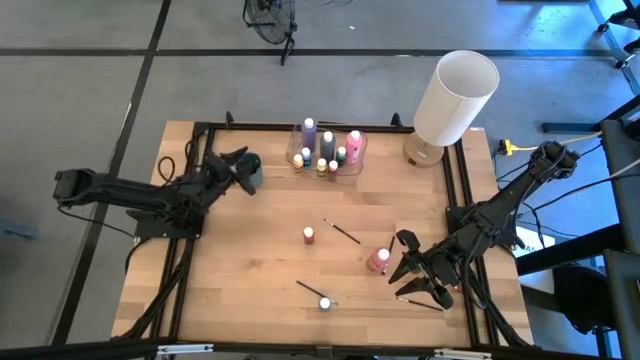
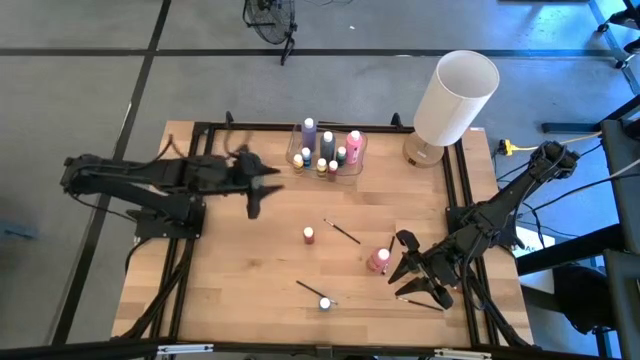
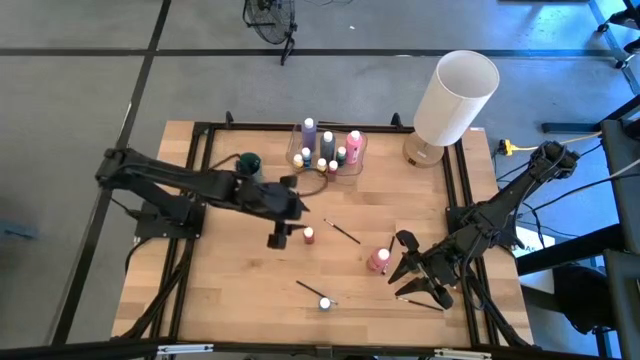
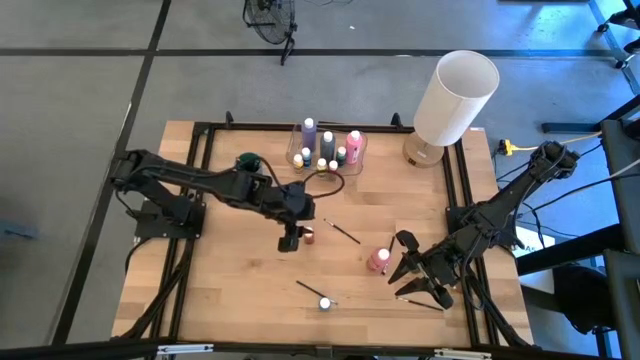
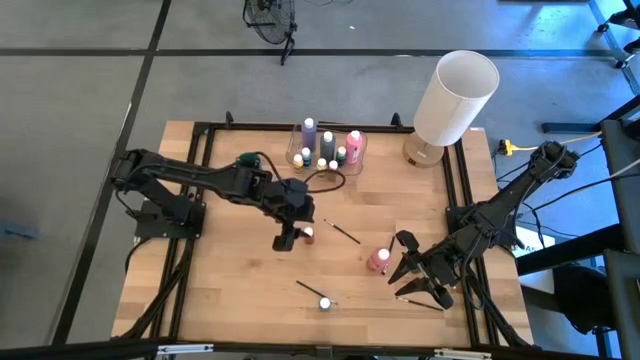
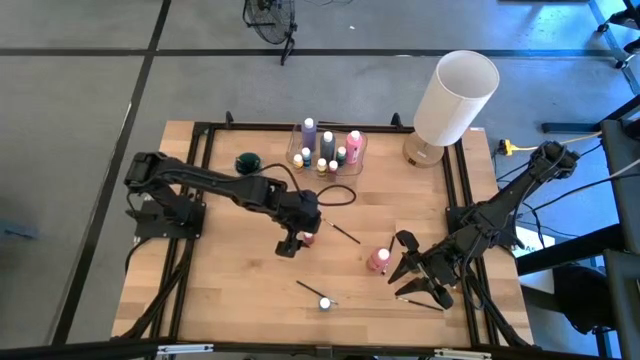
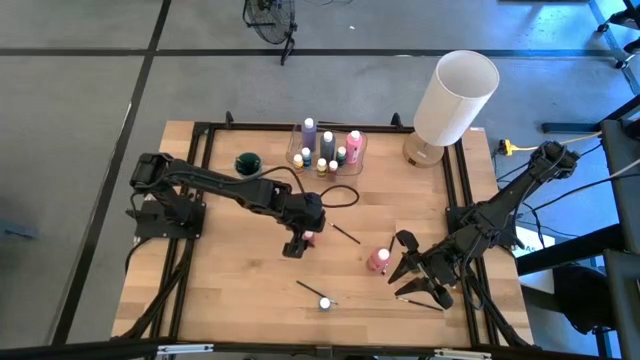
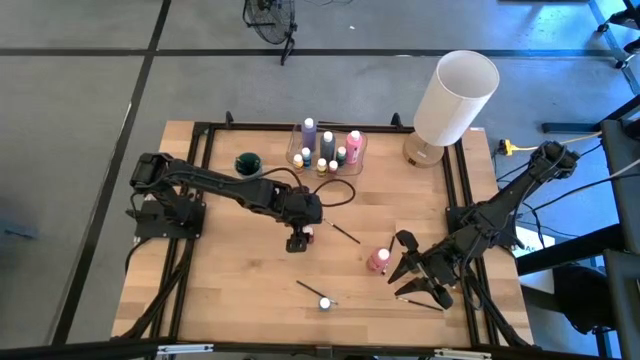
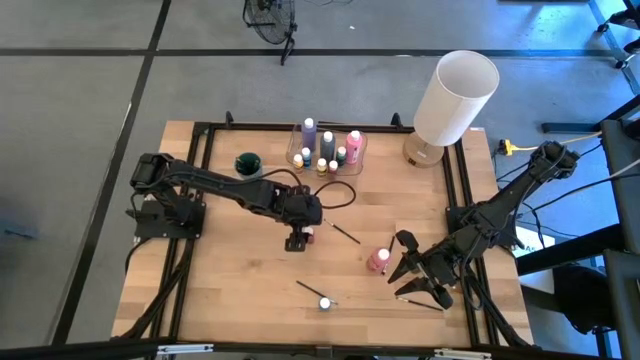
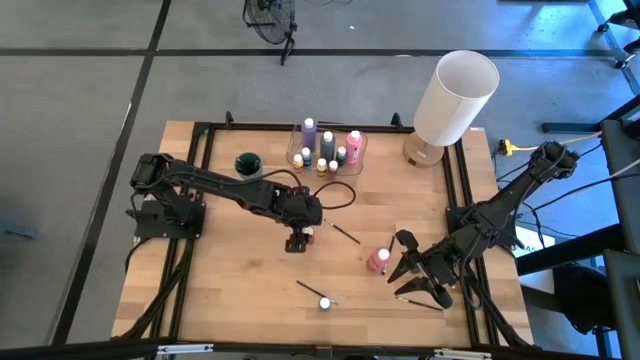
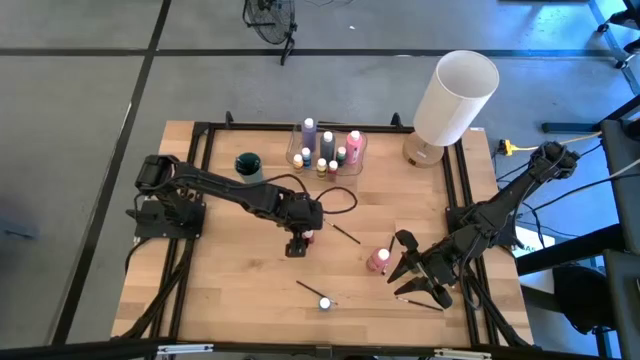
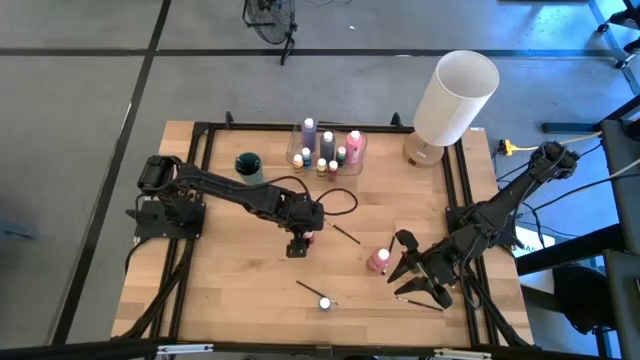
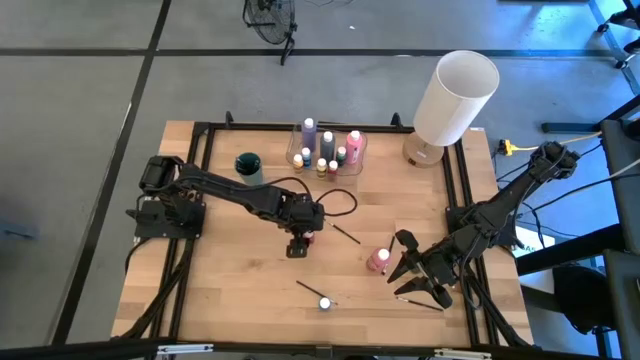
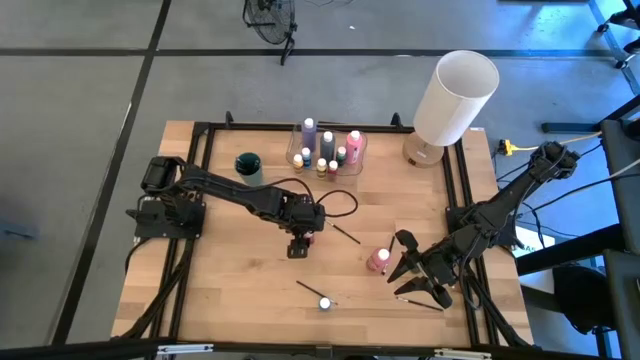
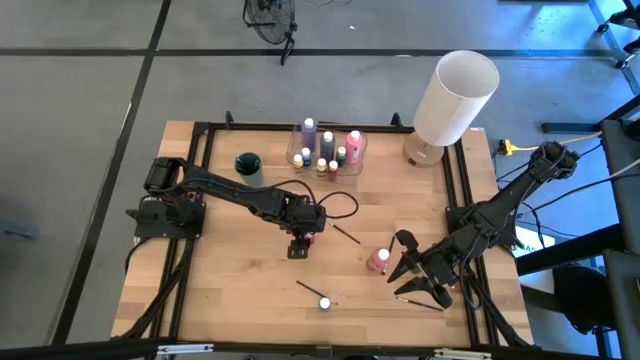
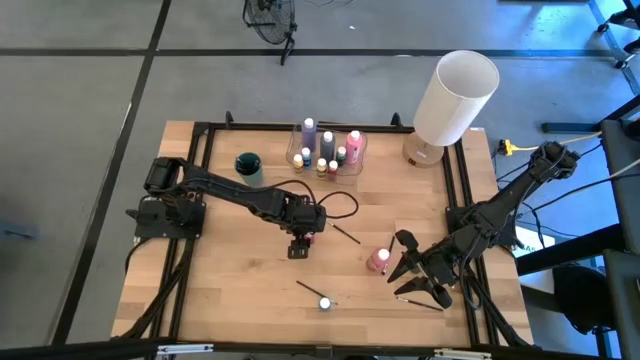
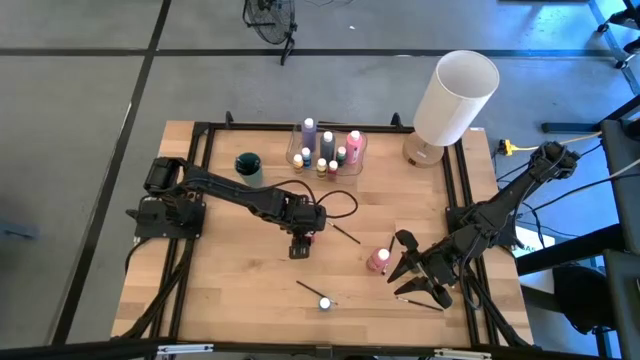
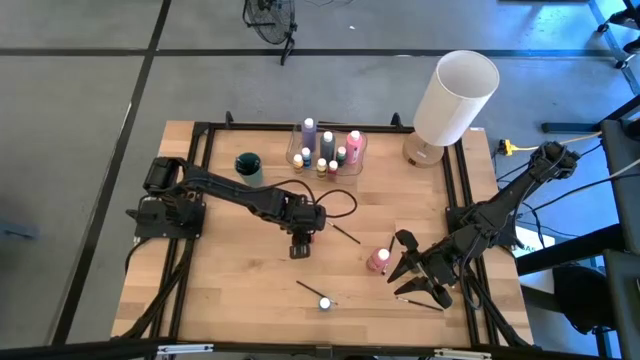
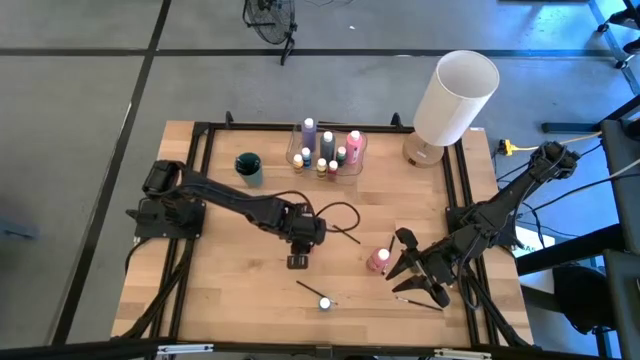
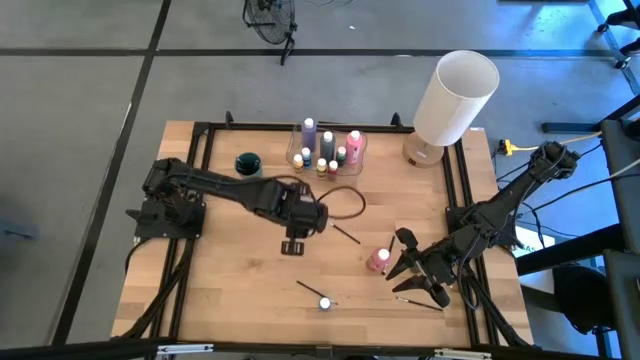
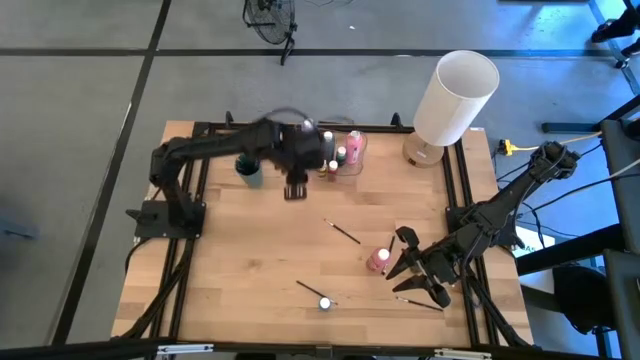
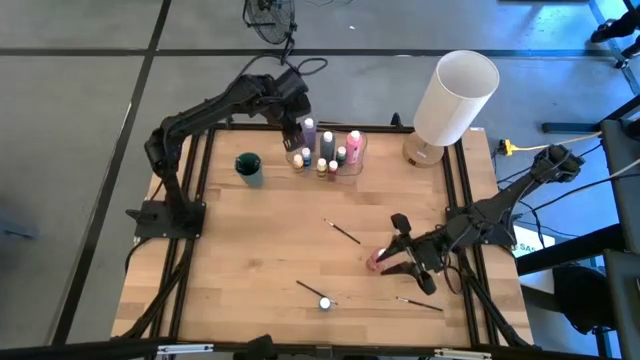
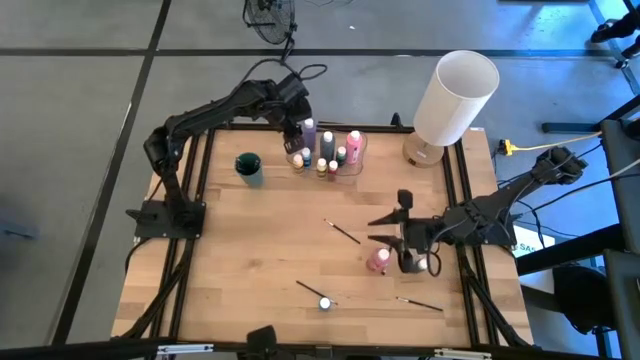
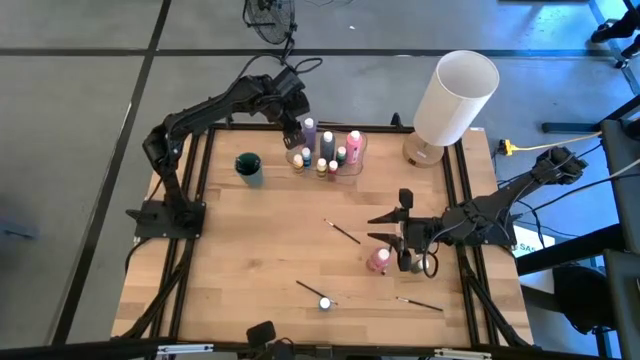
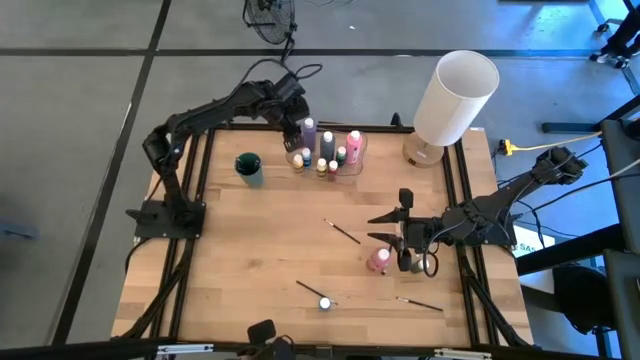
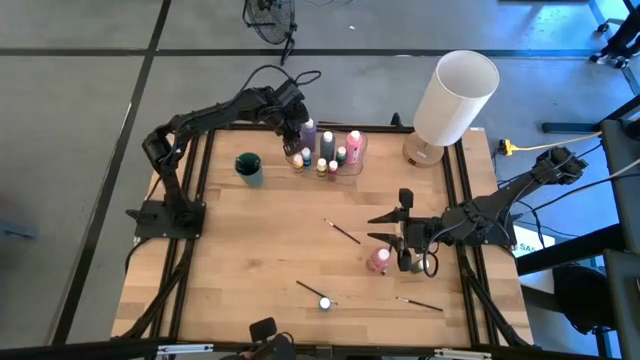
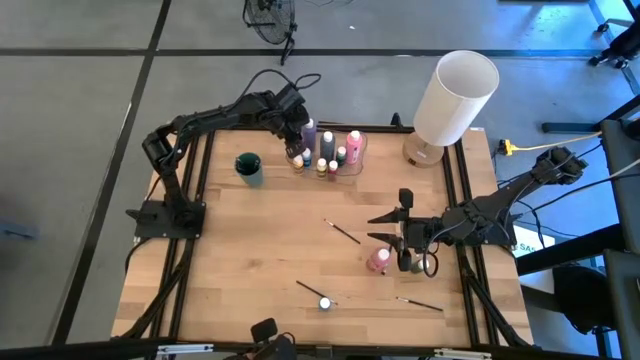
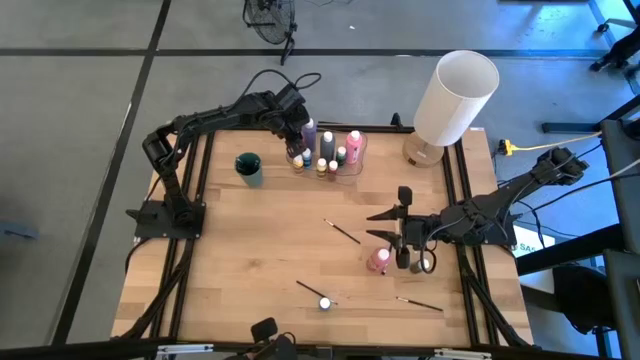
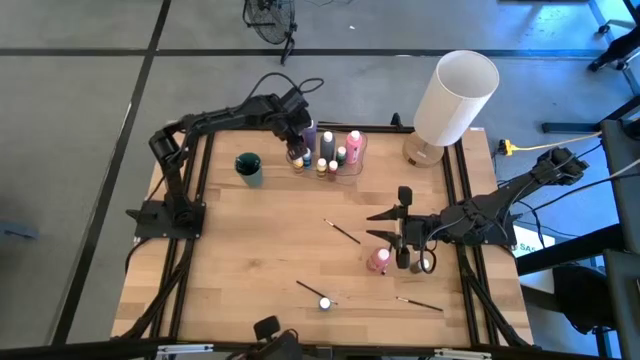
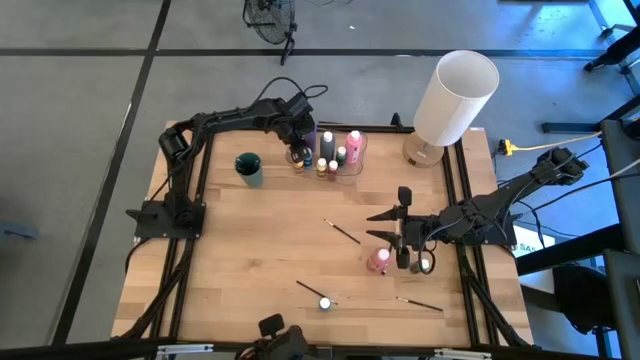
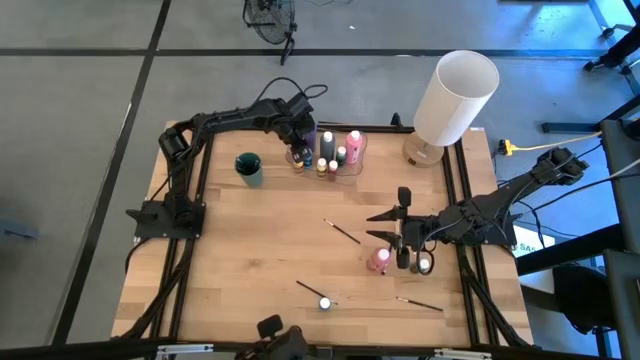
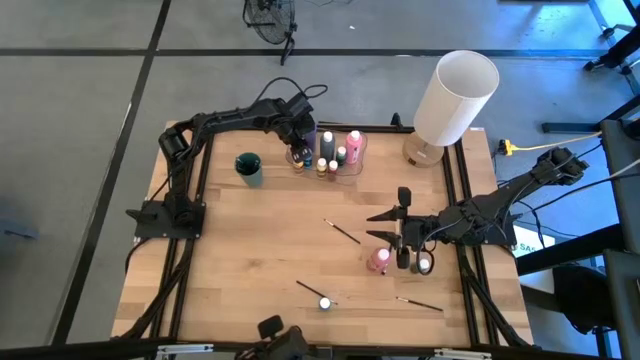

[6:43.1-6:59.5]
Task: Pick & Place Paint Supplies
Put the red paint bottle into the transparent bin

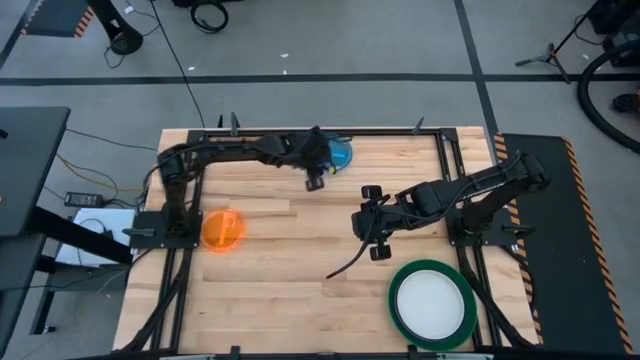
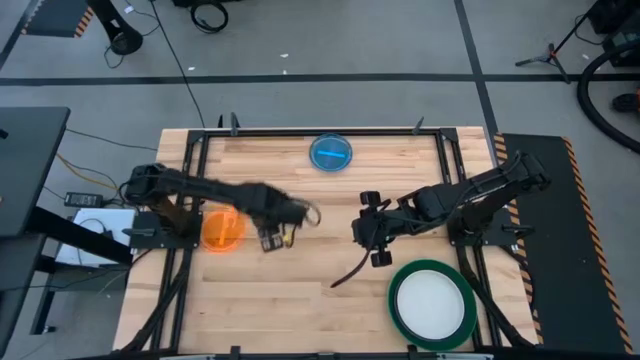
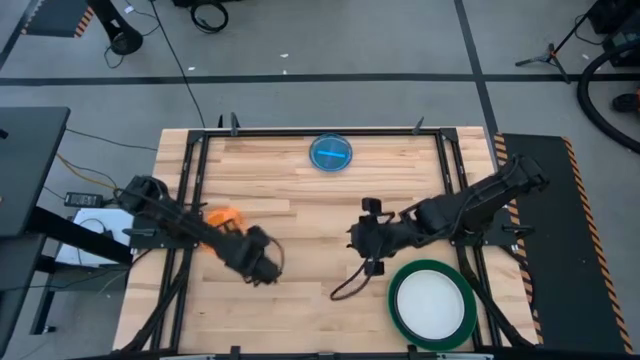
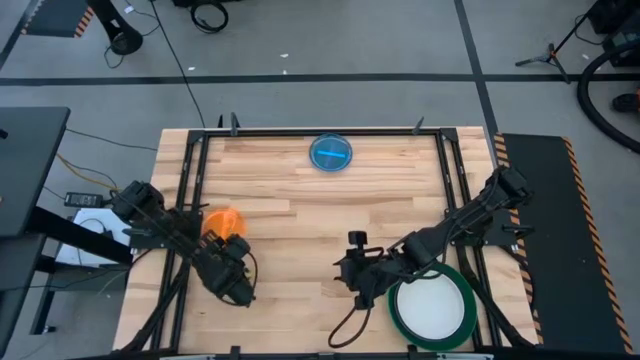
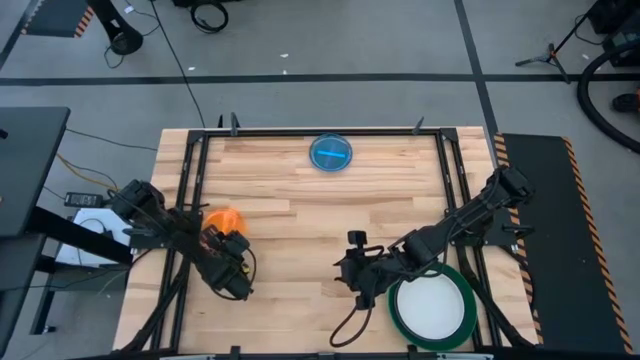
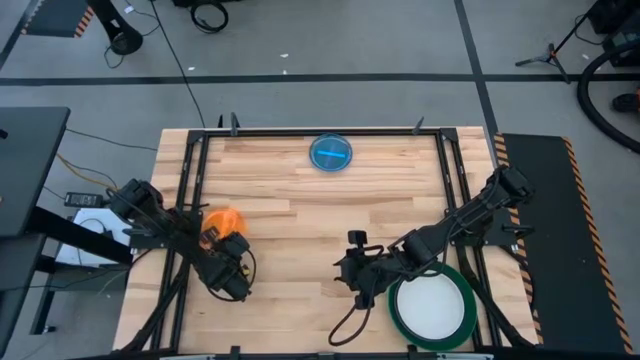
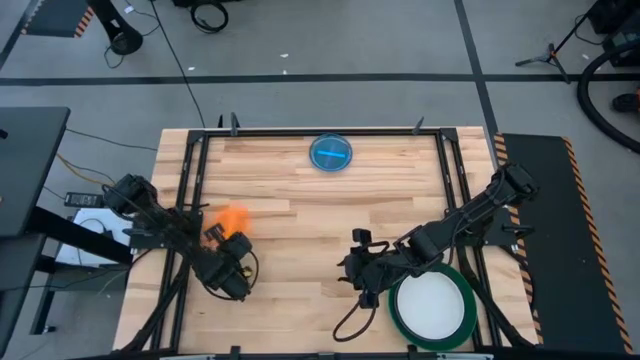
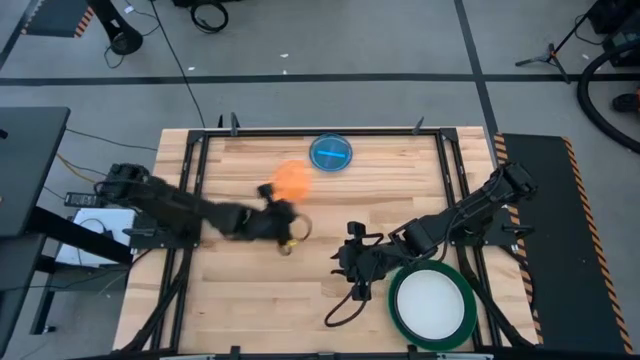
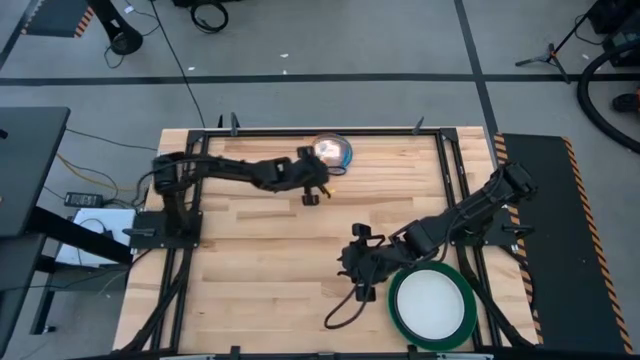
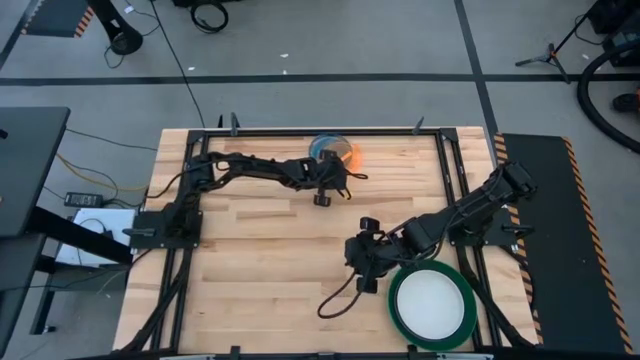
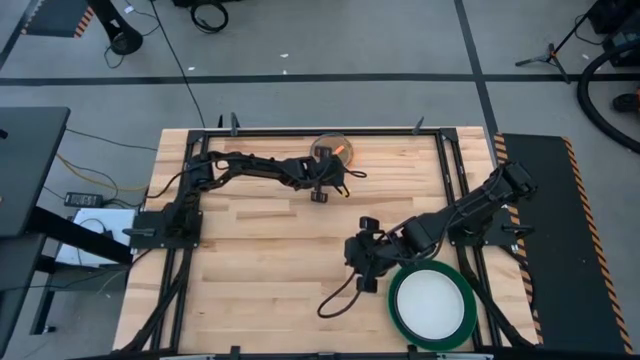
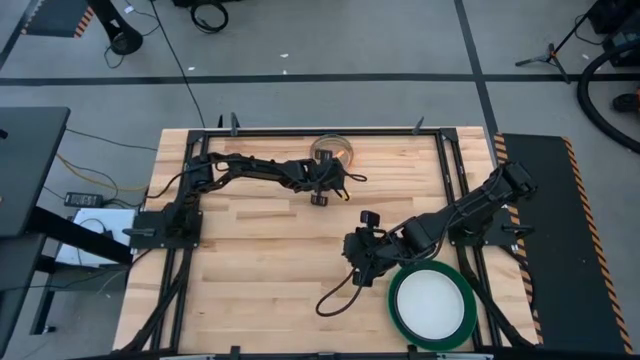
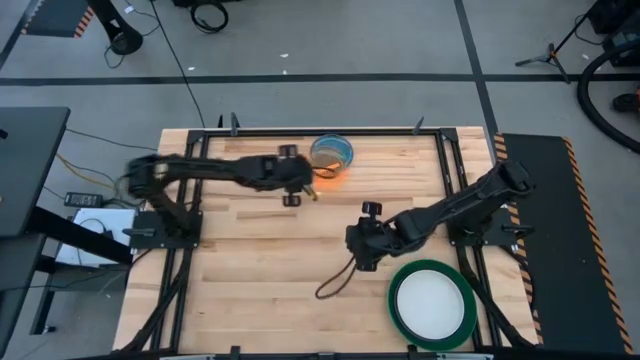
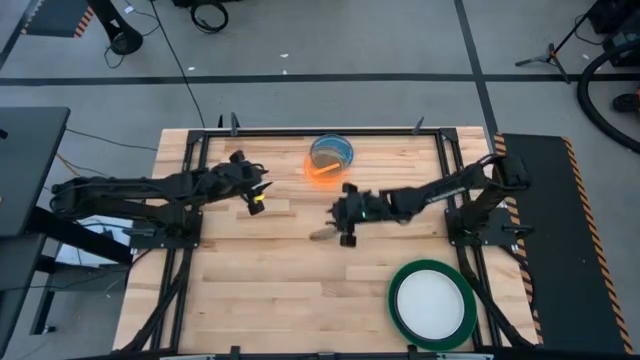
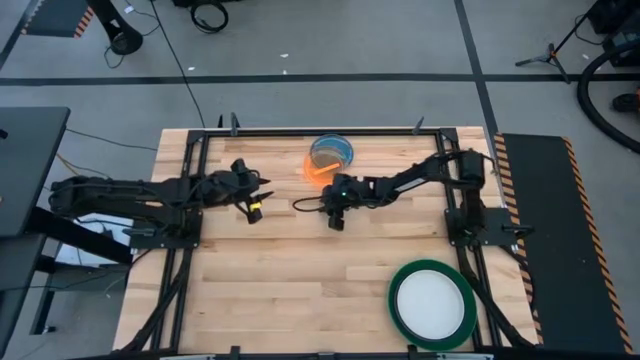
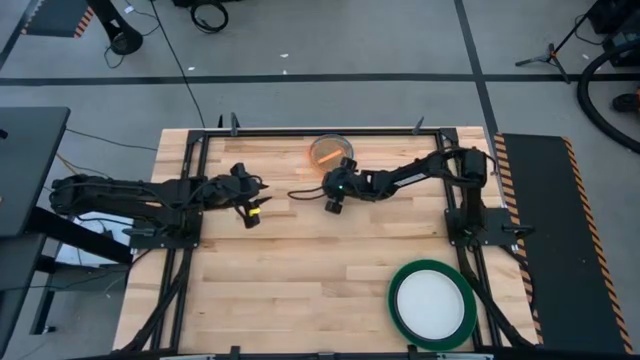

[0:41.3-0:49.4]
Task: Stack plastic plates
Stack the orange transparent plate on top of the blue transparent plate
